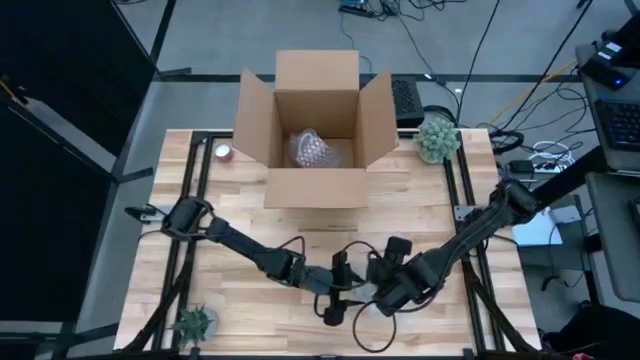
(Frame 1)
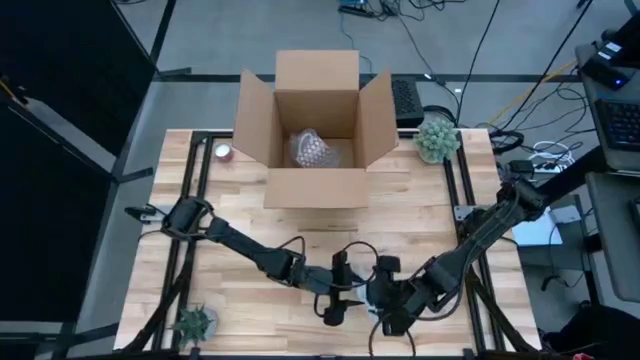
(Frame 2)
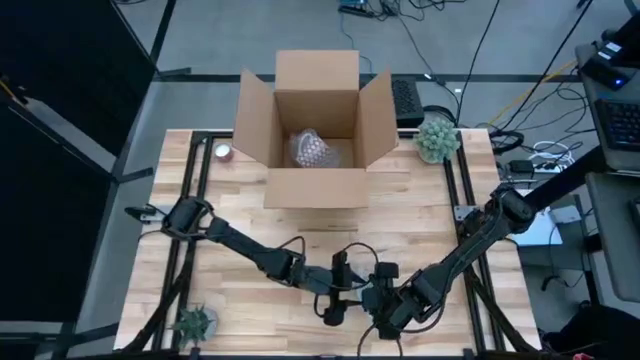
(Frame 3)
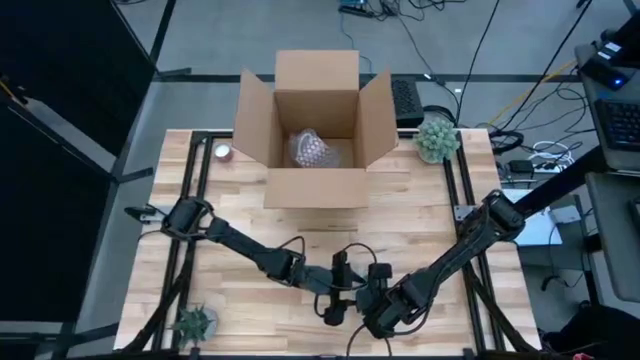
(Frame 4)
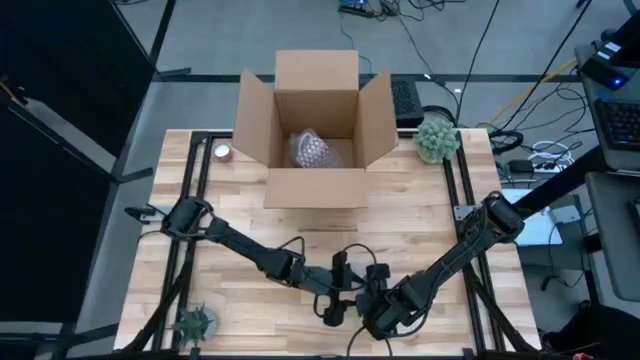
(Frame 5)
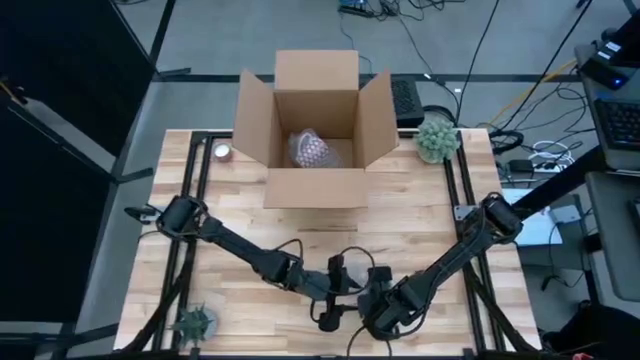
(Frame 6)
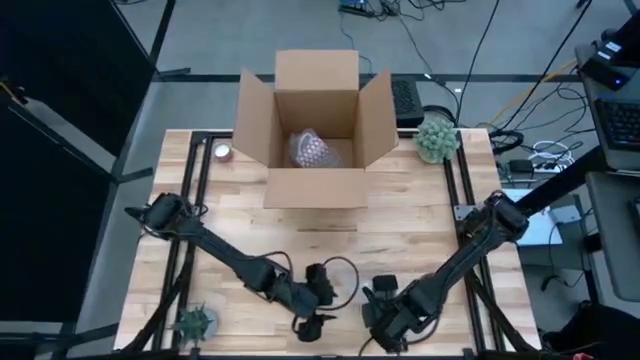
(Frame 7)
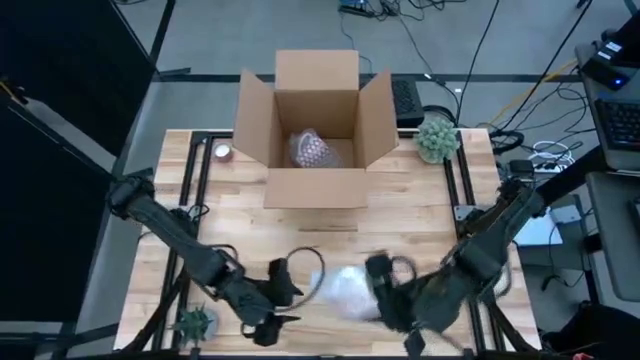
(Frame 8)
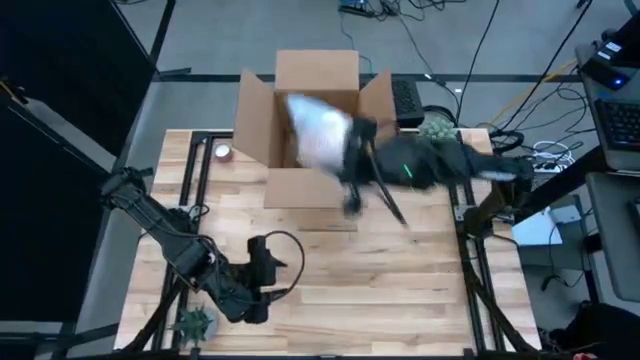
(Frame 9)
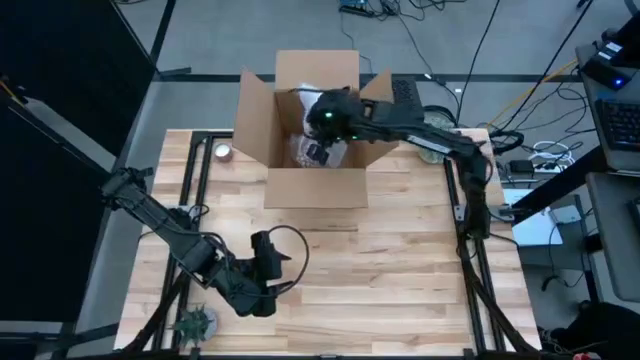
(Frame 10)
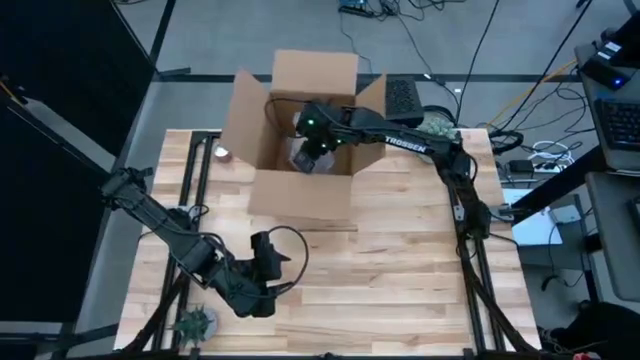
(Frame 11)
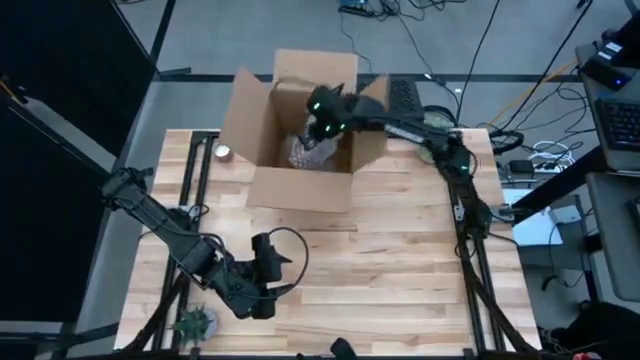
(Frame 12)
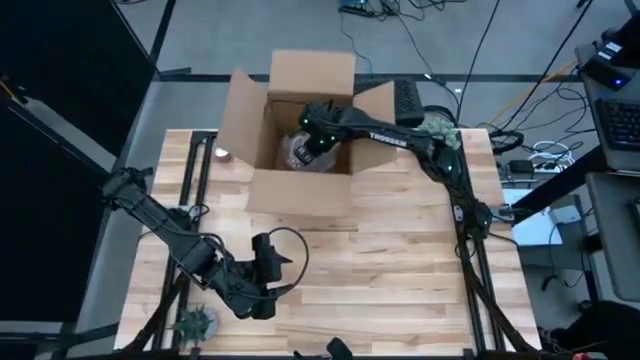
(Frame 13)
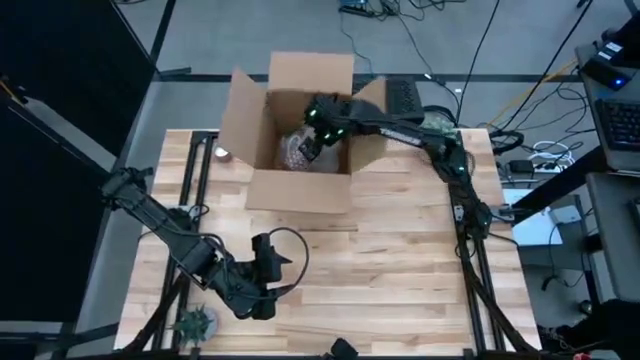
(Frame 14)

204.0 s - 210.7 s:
Task: wrap mug
Put the wrapped yellow mug into the box

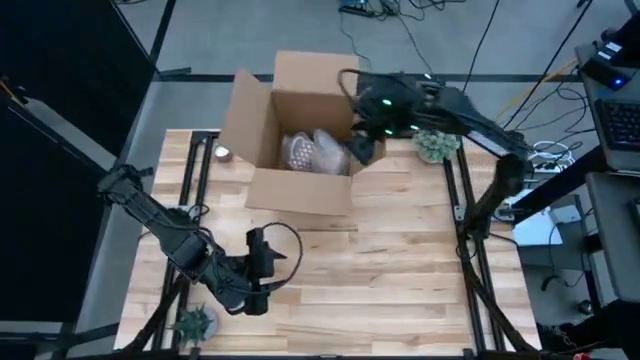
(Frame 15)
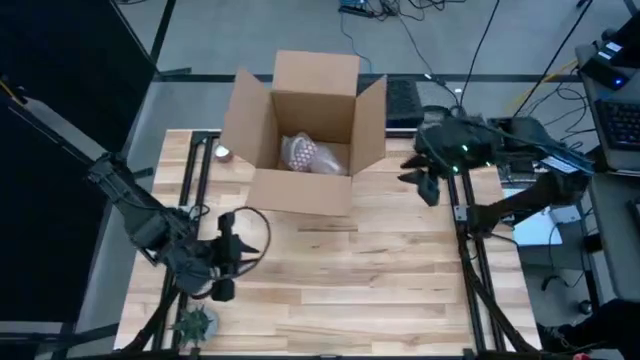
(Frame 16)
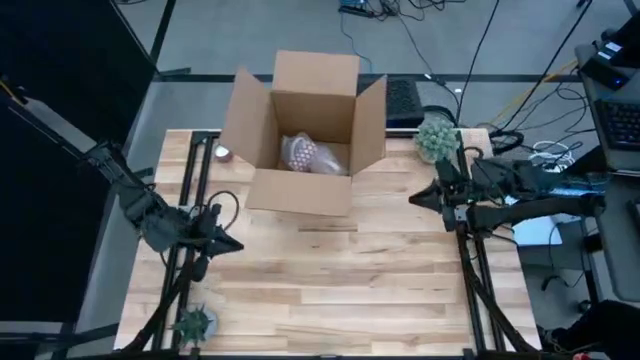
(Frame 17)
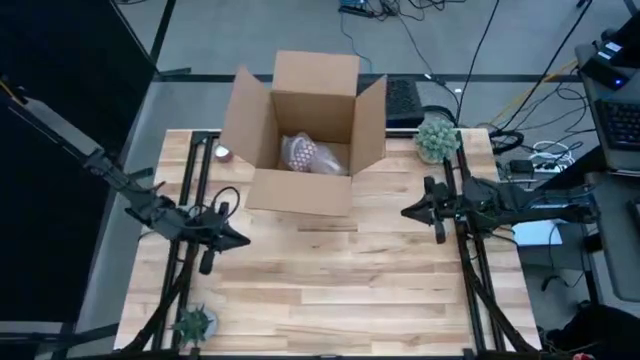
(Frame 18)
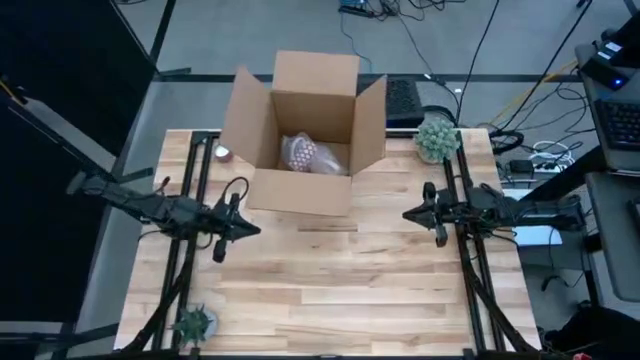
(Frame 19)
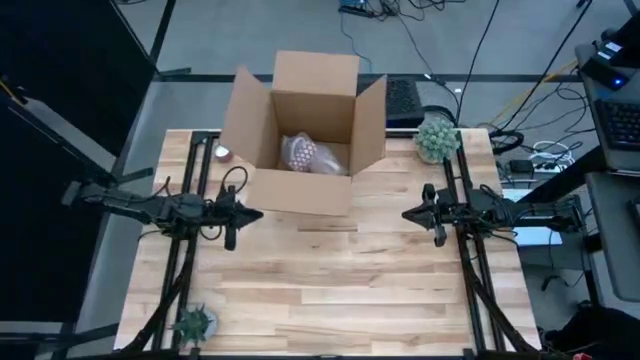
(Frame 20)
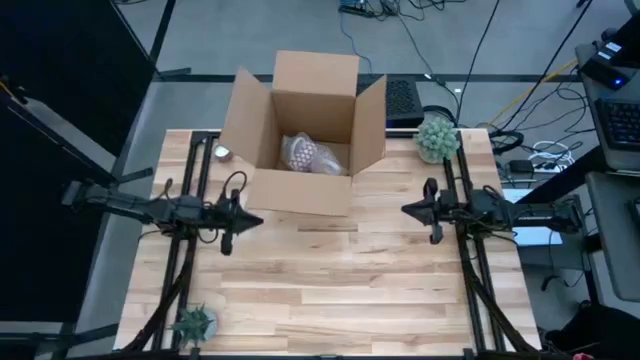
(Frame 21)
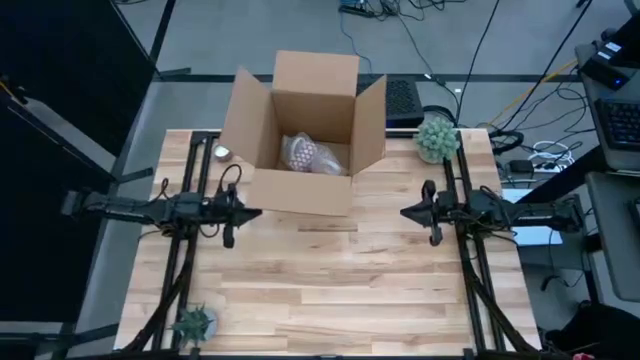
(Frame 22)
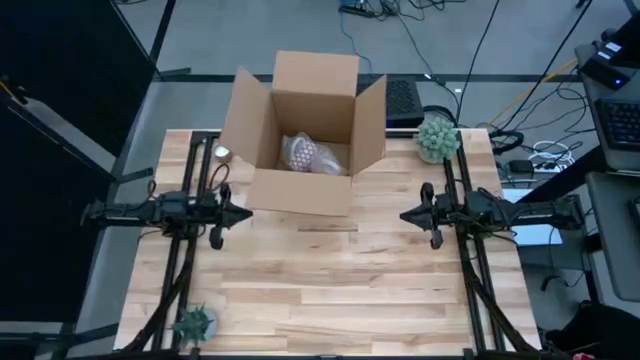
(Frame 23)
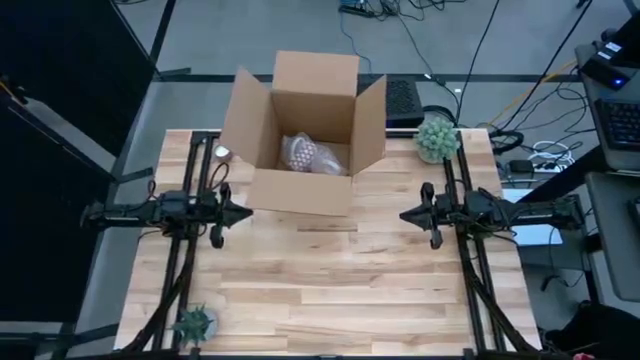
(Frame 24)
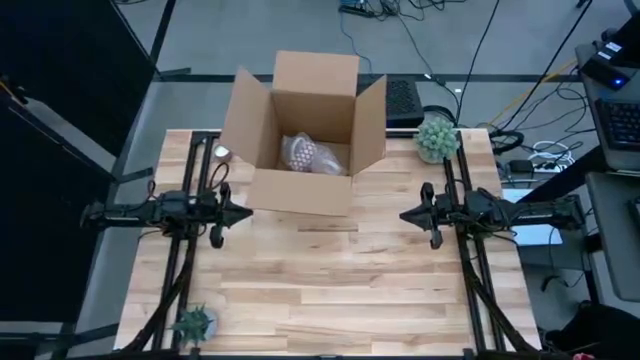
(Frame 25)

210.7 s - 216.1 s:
Return to Home Position

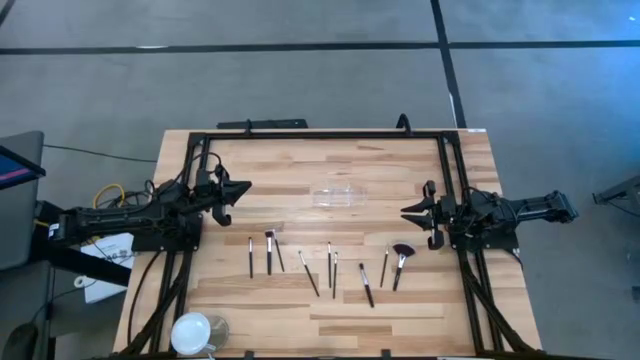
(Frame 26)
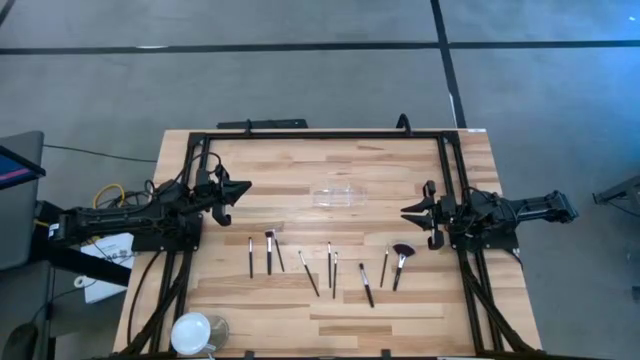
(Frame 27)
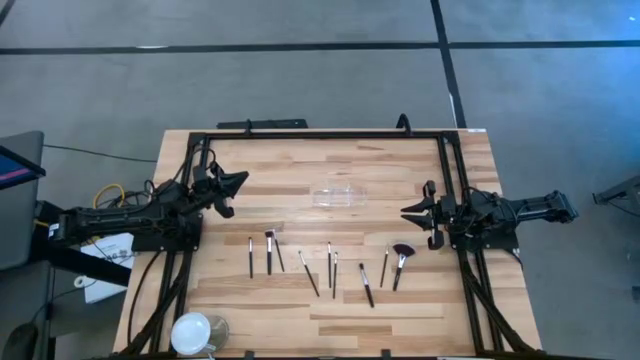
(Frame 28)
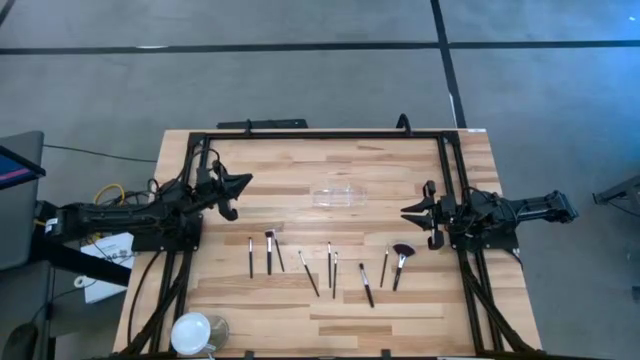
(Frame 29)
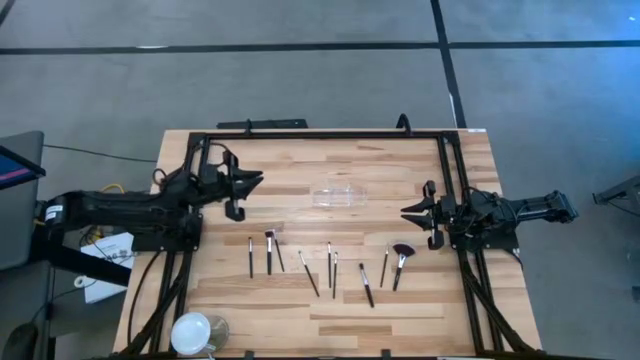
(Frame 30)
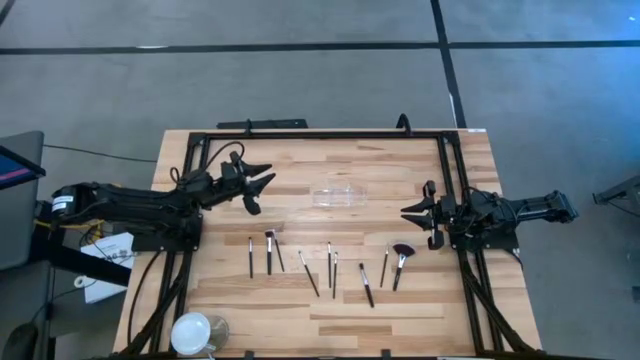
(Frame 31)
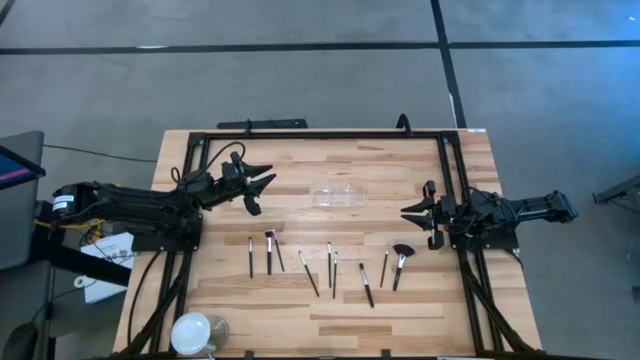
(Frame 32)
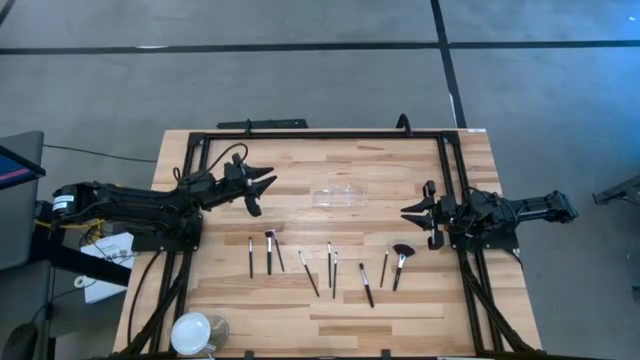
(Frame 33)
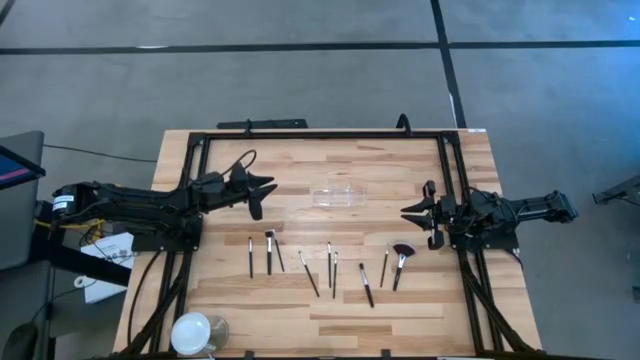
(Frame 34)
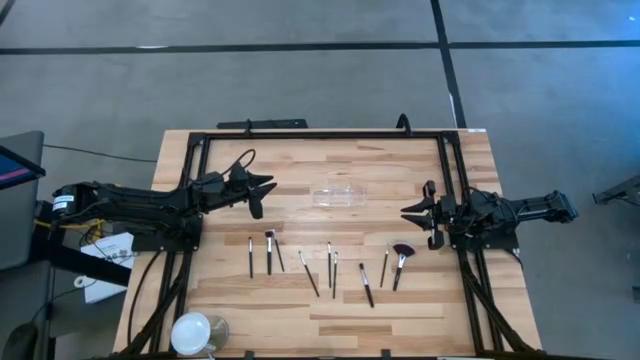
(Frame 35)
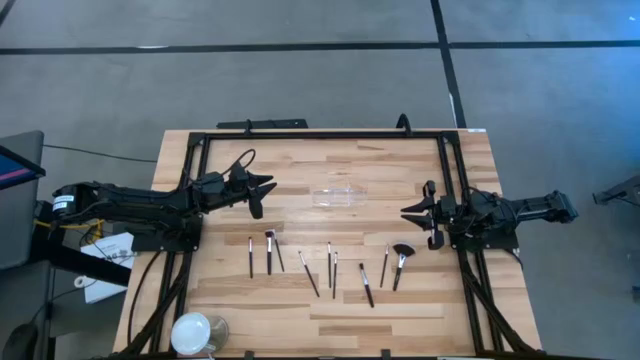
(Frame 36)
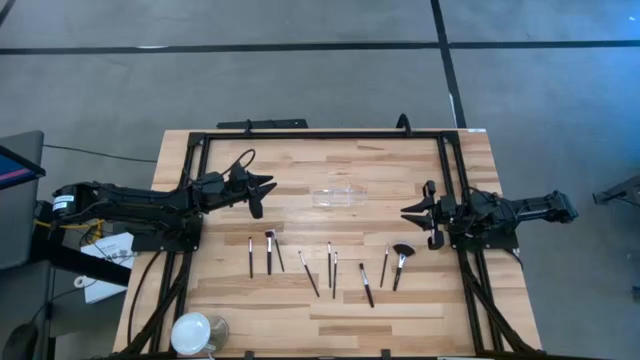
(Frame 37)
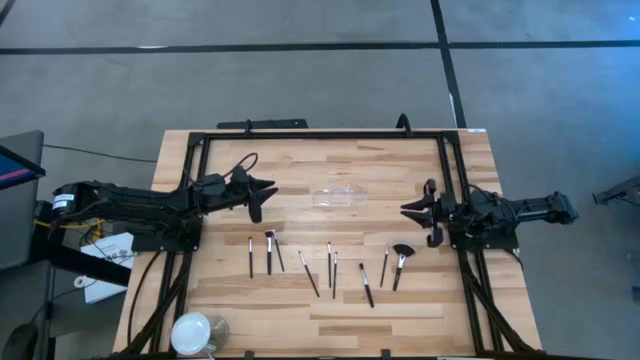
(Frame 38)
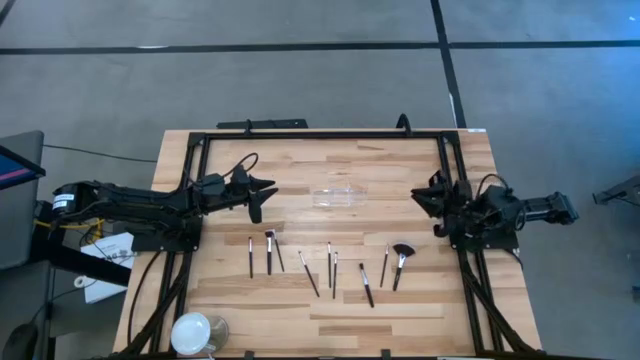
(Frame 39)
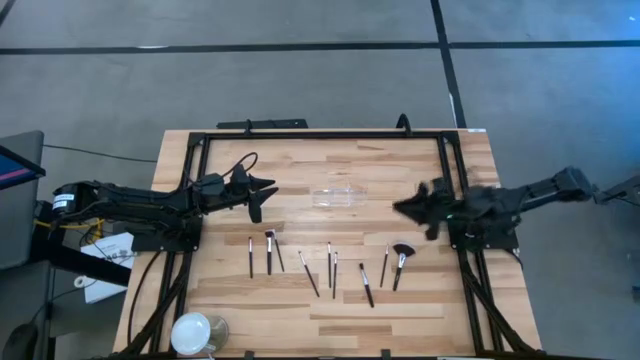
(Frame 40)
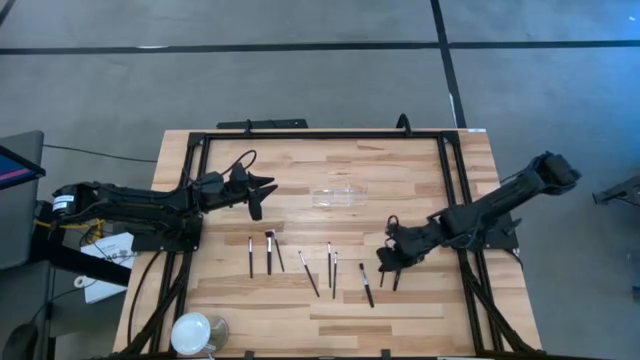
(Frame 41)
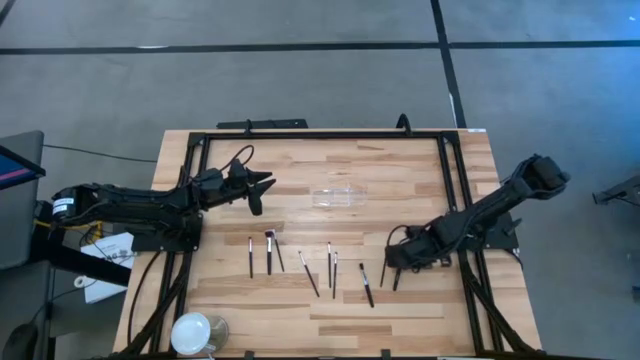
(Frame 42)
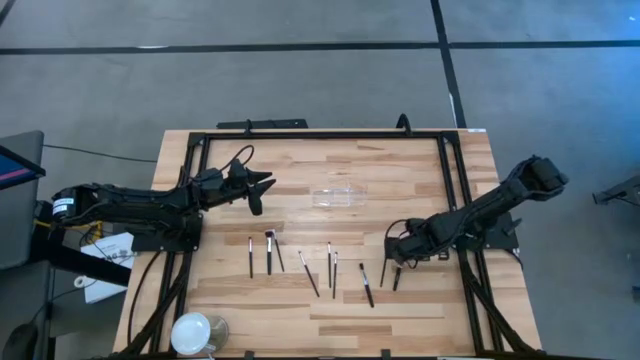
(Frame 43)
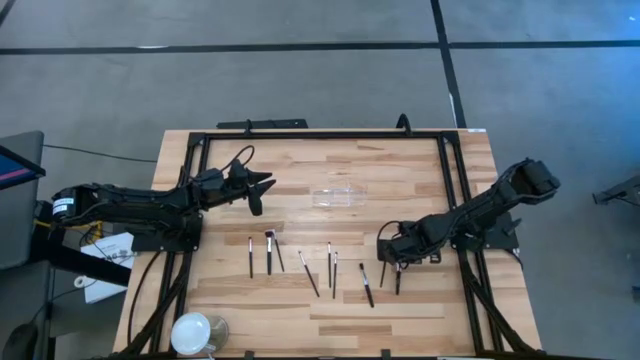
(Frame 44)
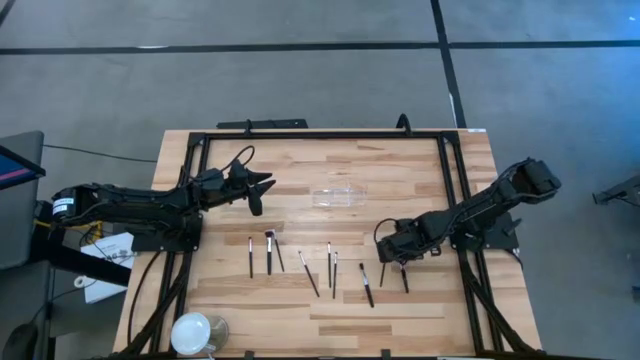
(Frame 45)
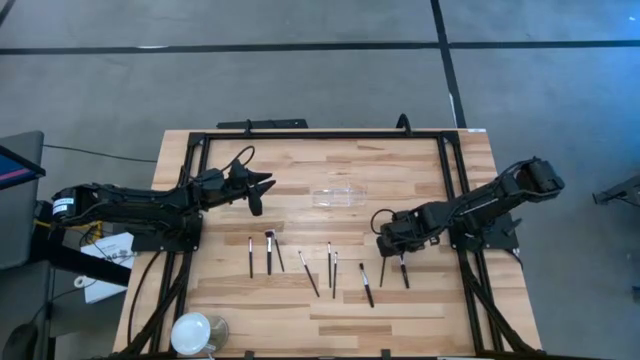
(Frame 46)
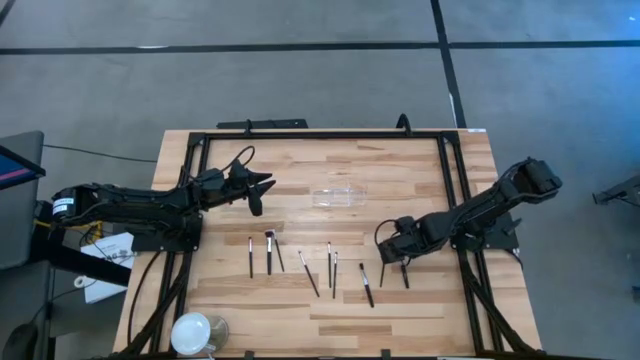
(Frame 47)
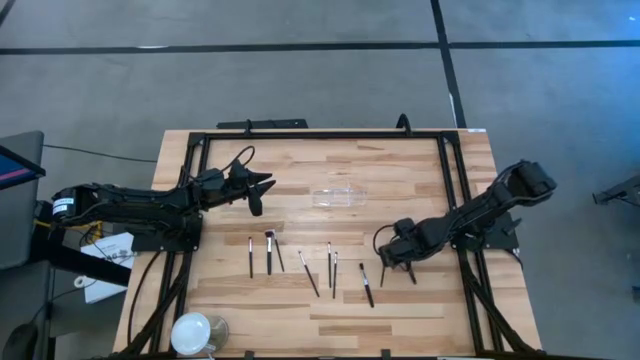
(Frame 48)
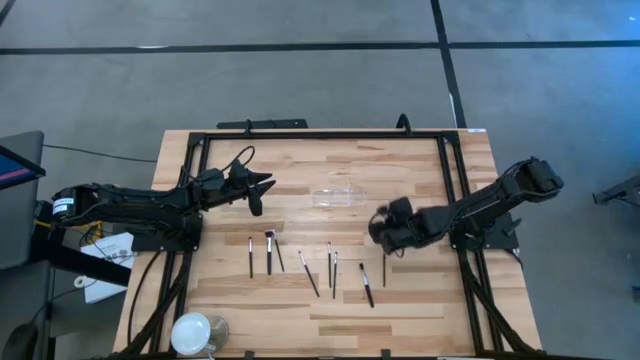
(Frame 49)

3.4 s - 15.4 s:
Task: Put items in baskets/containers
Put the highlighter brush into the left section of the transparent organizer
